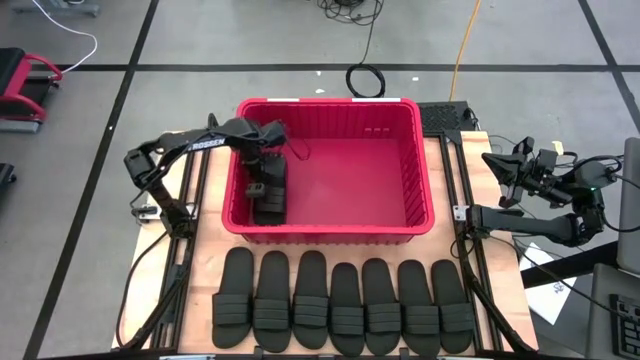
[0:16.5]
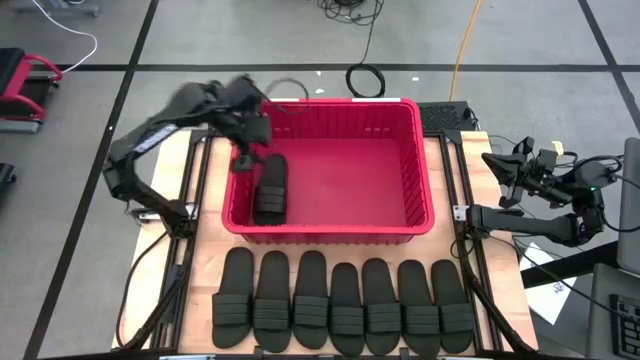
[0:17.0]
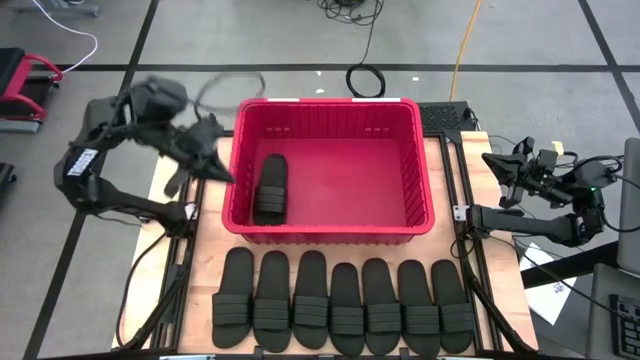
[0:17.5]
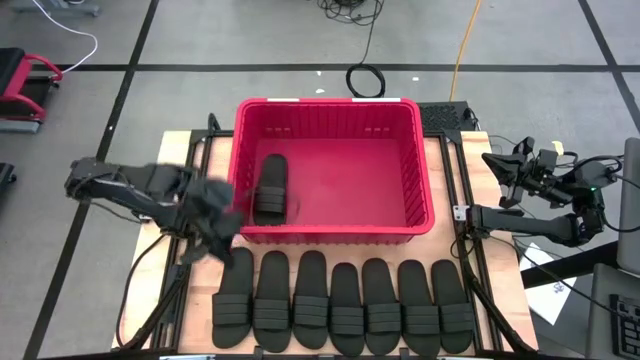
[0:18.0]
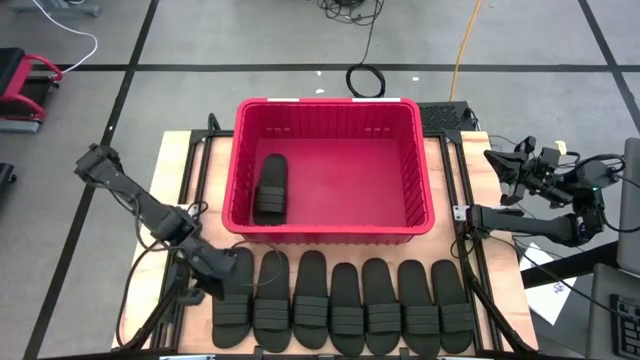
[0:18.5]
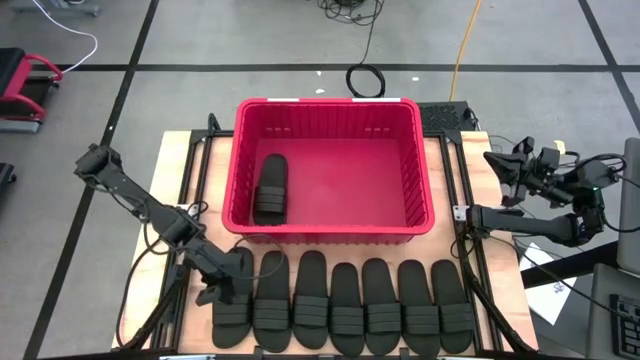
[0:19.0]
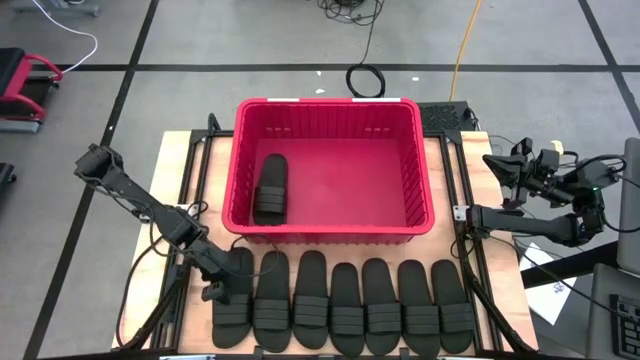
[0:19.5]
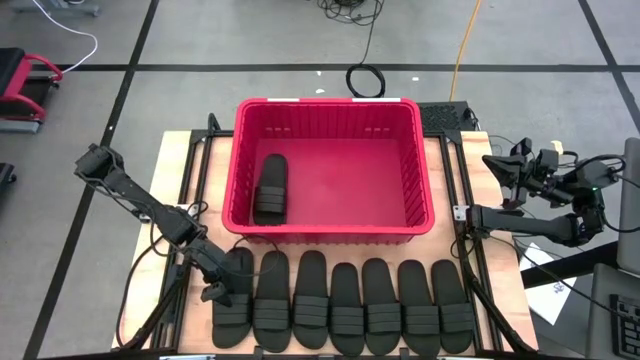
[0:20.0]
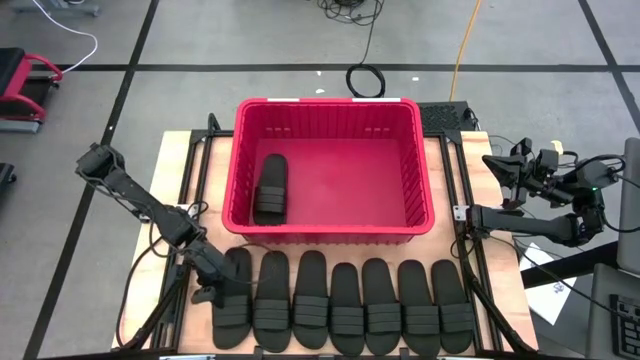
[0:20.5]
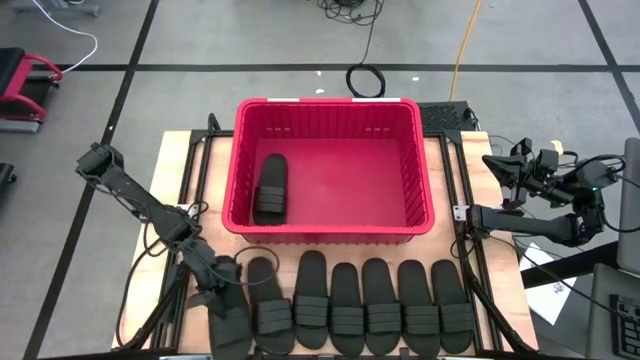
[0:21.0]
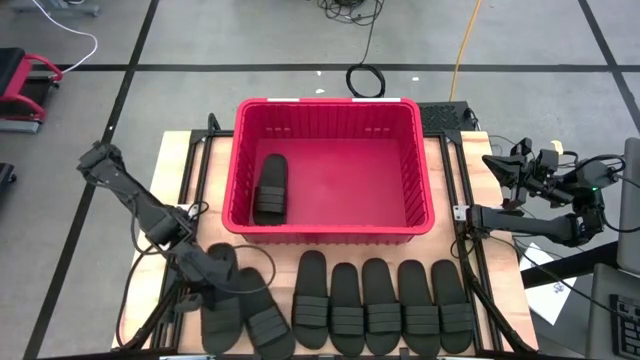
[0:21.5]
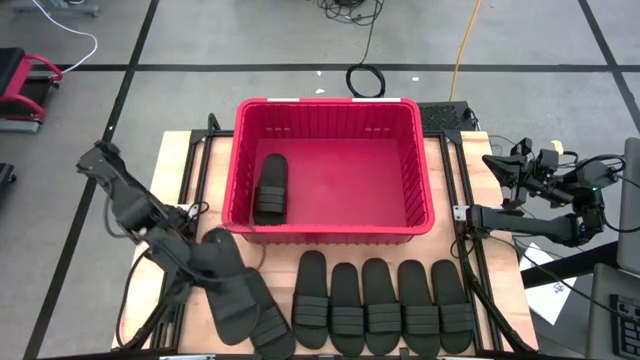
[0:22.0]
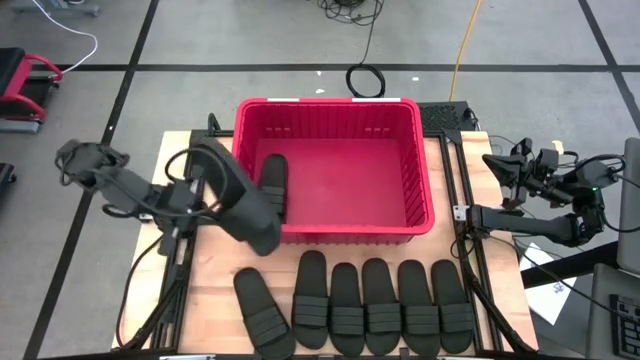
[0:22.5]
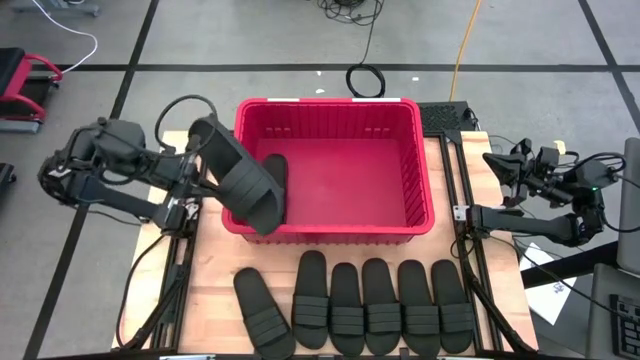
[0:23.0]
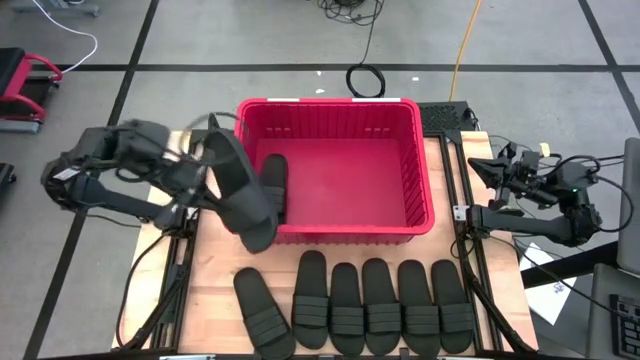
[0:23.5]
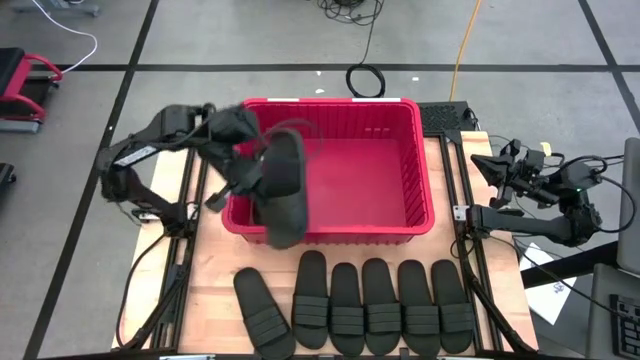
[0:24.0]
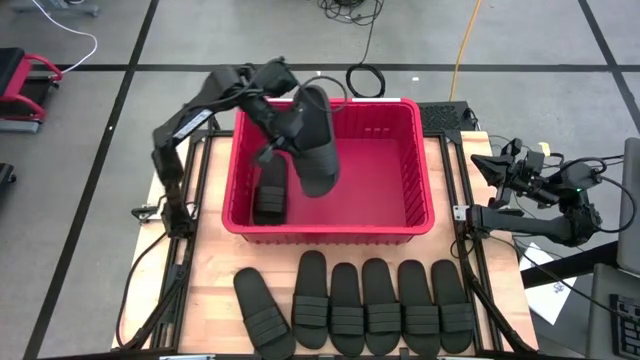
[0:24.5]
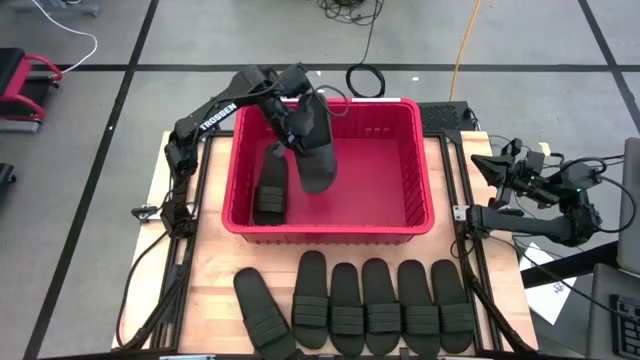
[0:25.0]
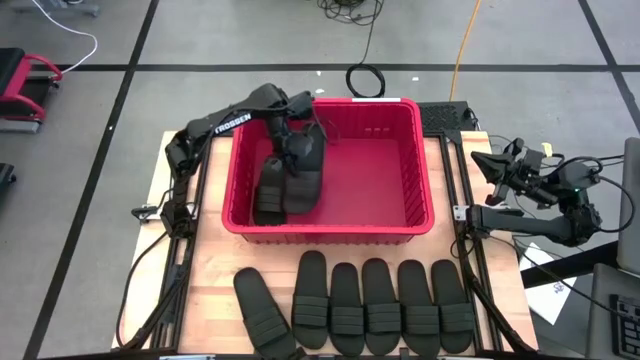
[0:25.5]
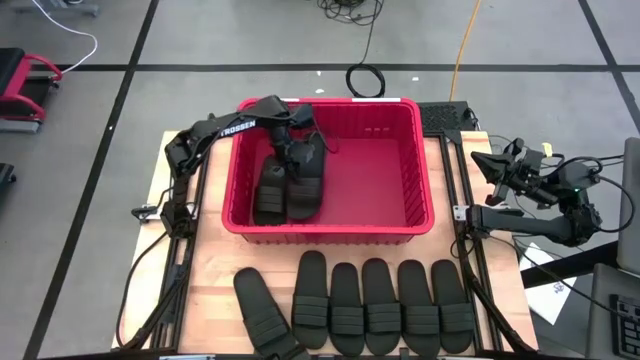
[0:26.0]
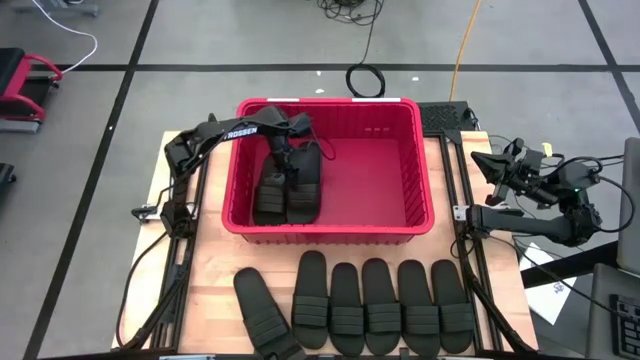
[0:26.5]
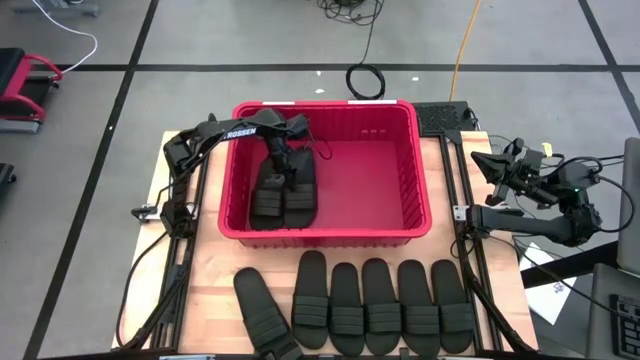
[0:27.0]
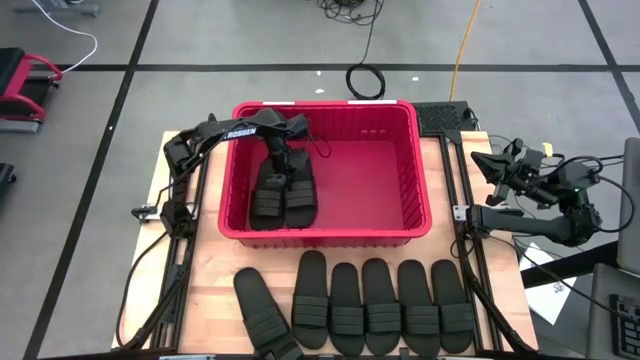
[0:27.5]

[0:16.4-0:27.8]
Task: Pick and place slides into bin
Put the black slide into the red bin

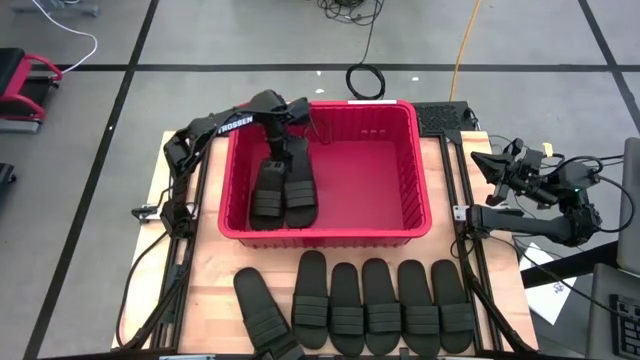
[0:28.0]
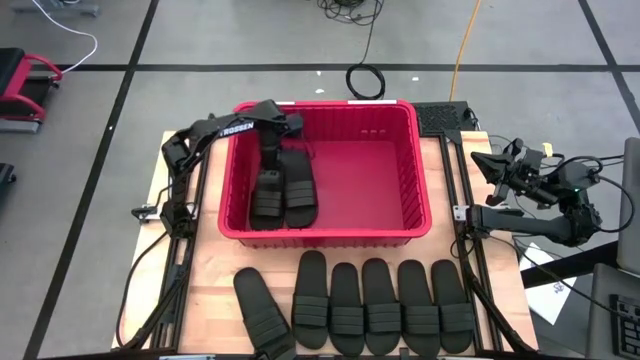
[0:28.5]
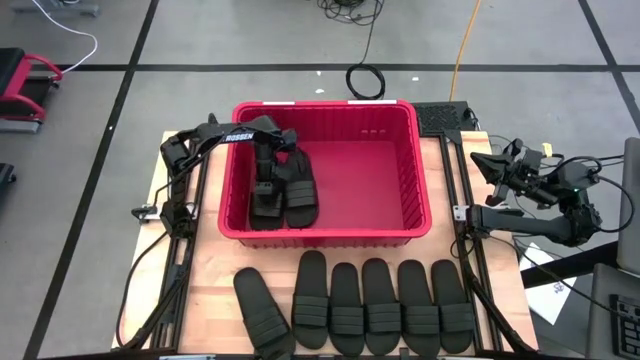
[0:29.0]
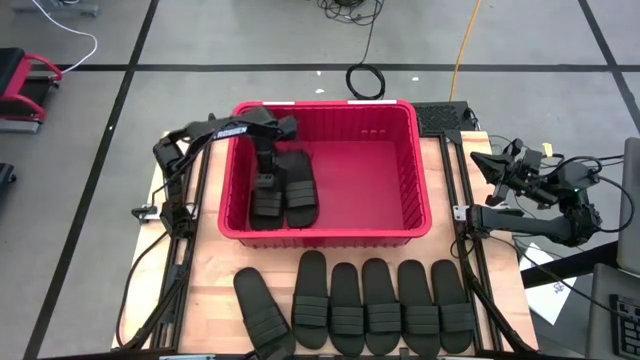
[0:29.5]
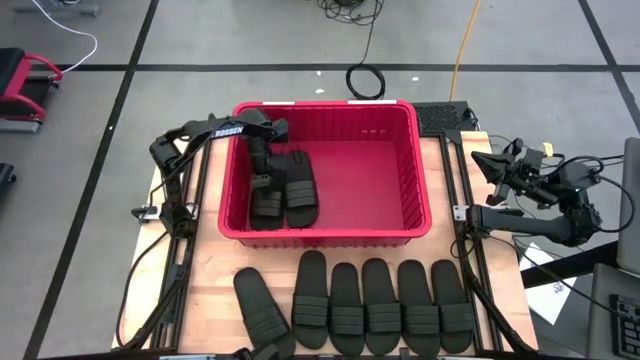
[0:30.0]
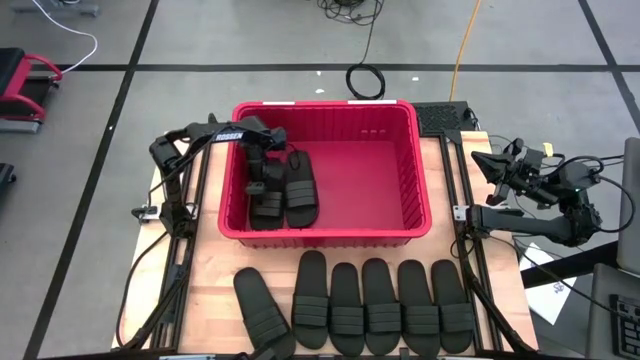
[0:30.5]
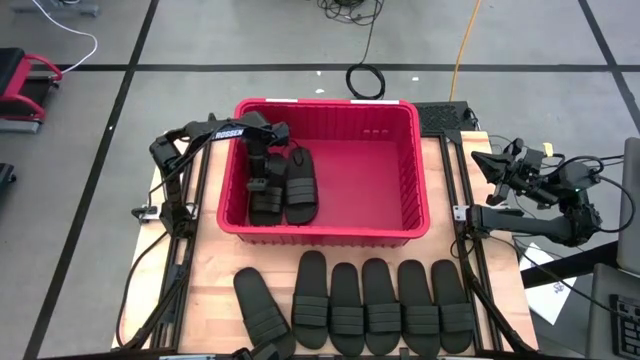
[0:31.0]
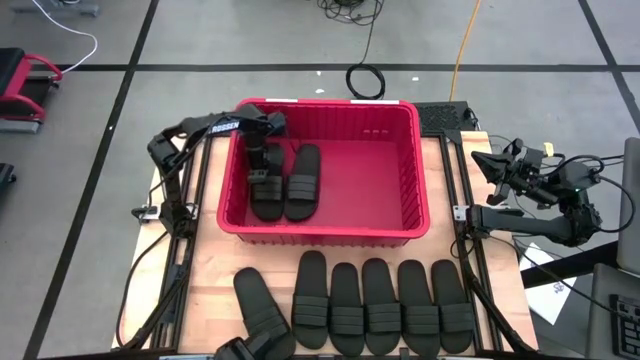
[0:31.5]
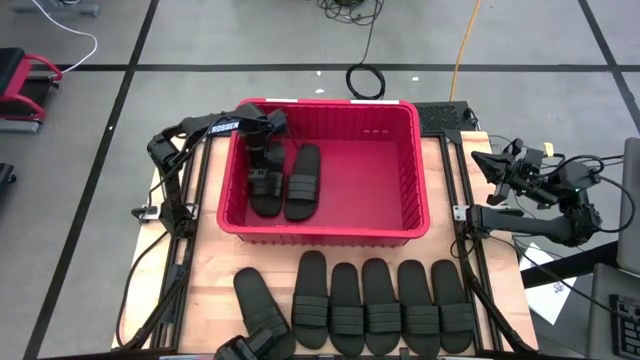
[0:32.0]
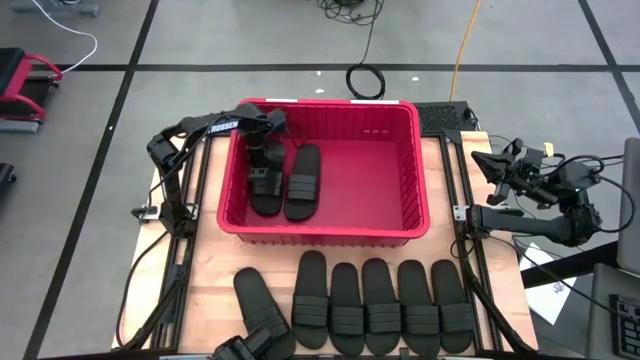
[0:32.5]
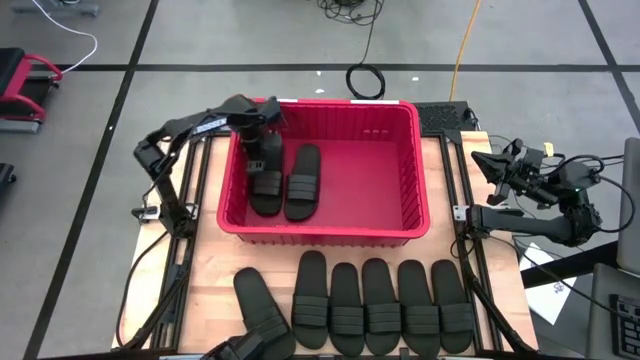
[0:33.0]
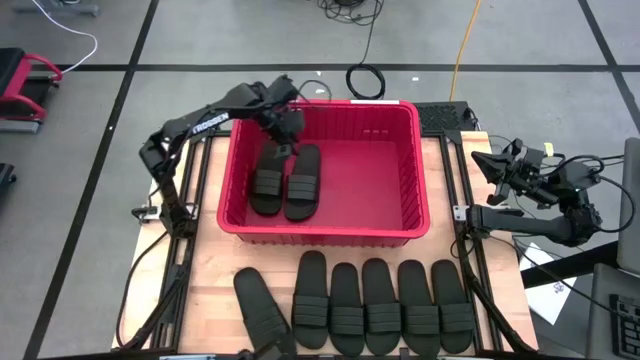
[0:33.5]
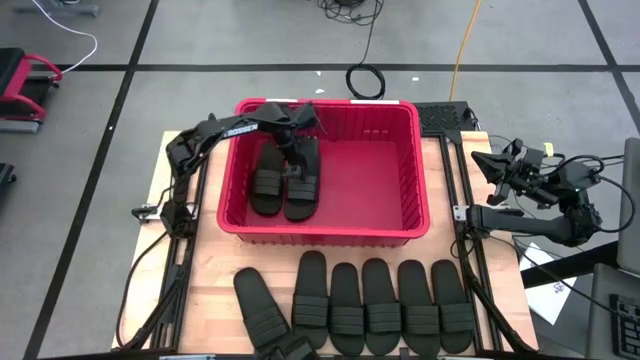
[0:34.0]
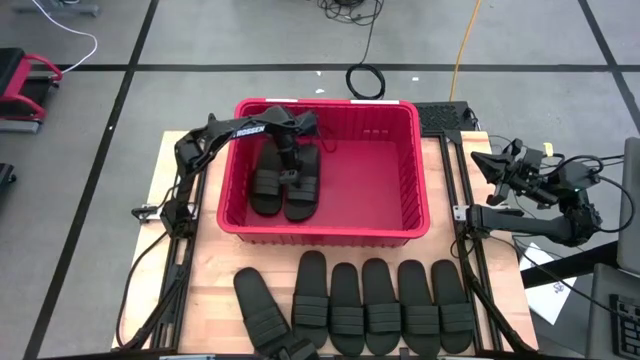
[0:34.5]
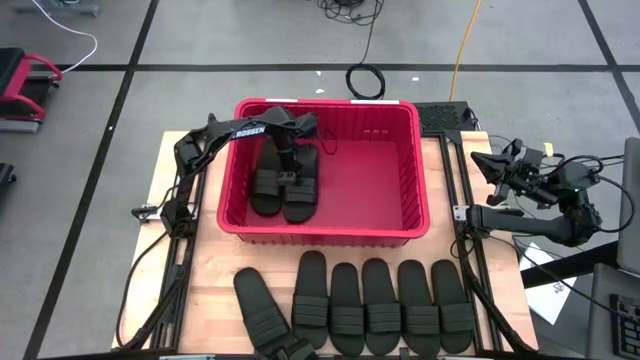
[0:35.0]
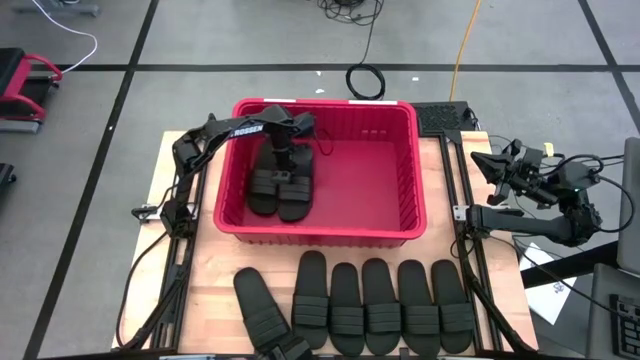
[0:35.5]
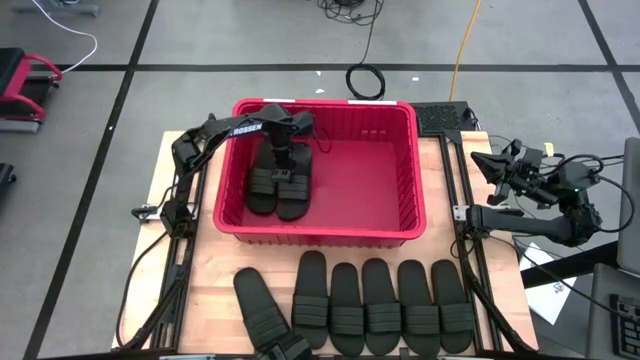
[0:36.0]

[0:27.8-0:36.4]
Adjust the black slides in the bin

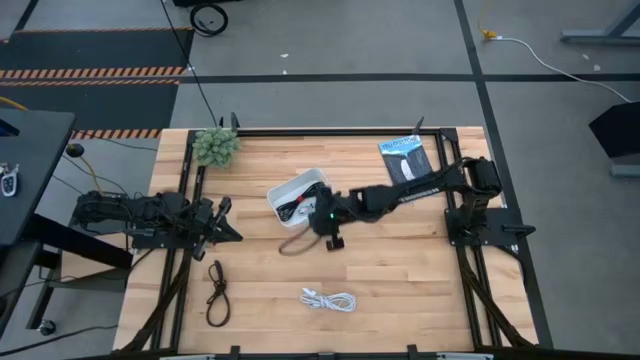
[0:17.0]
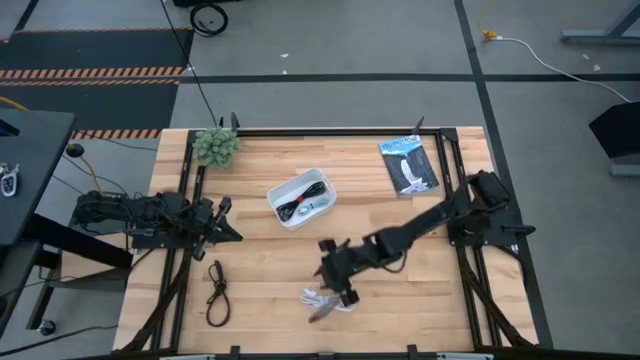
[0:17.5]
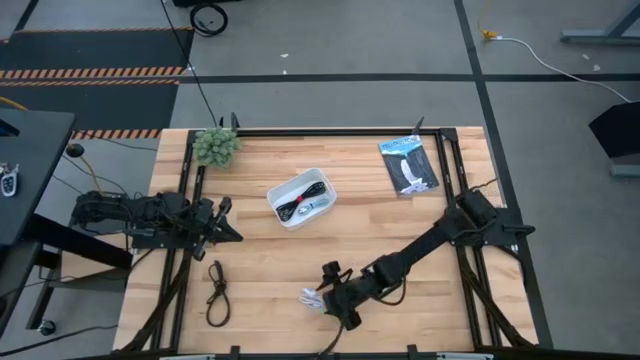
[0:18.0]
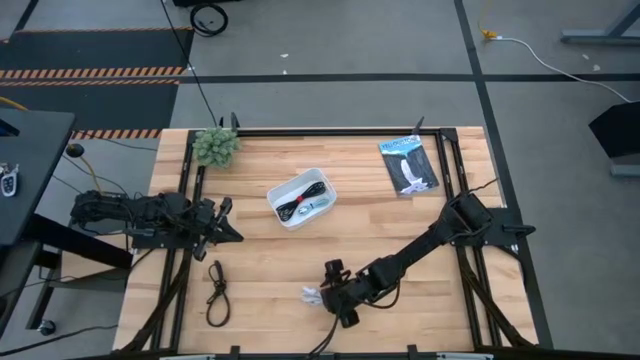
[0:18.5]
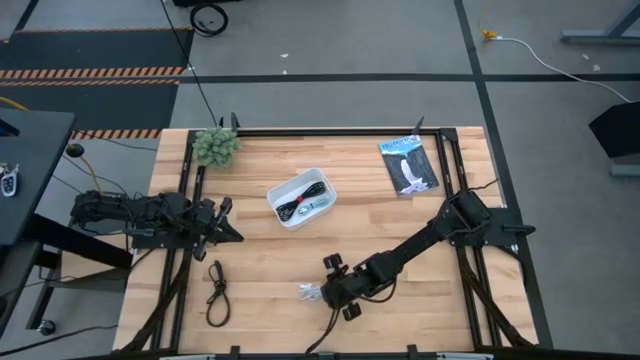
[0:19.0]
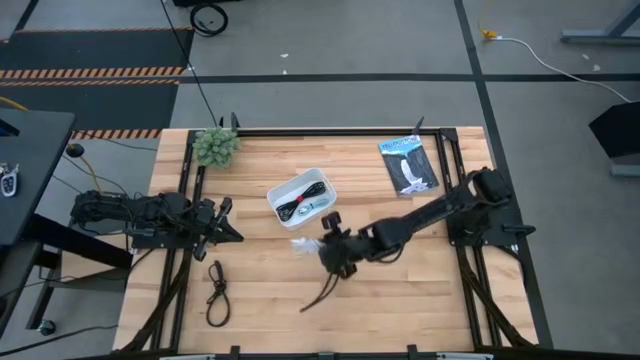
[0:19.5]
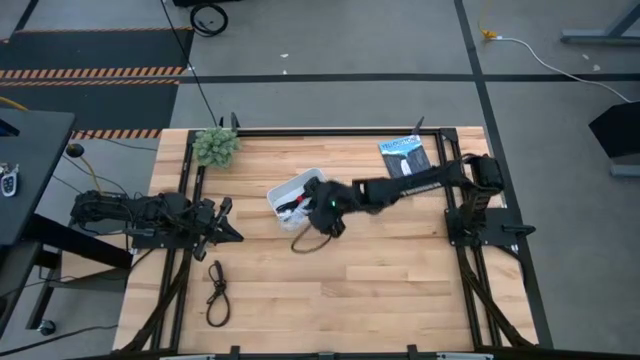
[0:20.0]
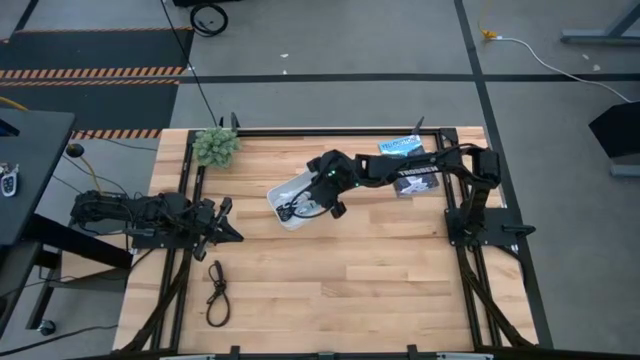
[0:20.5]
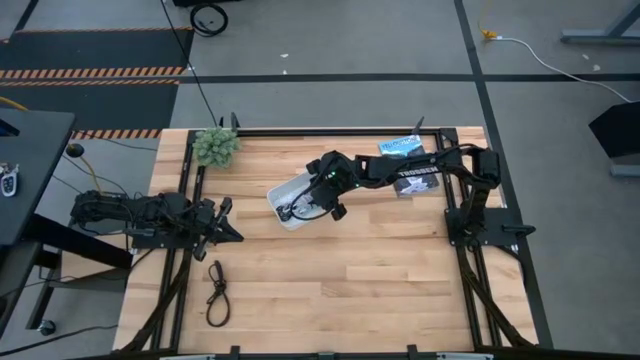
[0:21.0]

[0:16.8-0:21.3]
Task: Pick and place USB-C Cables
Put the white cable charger into the white bin
